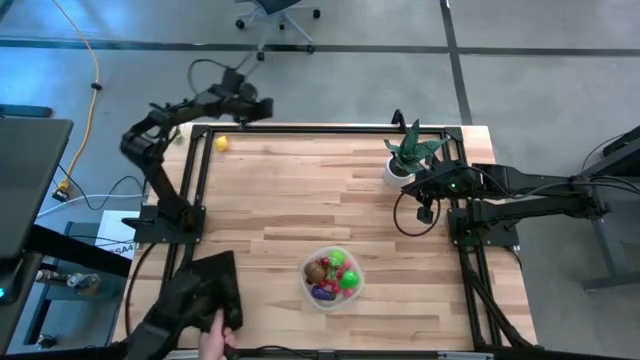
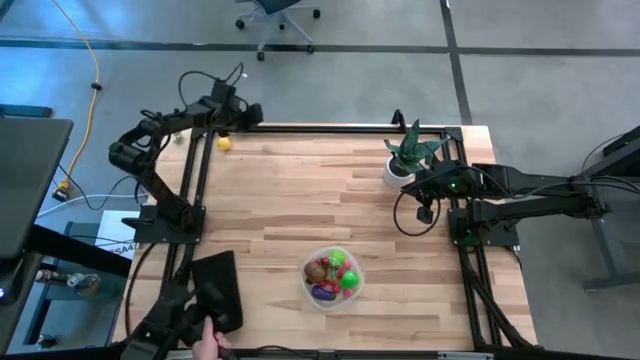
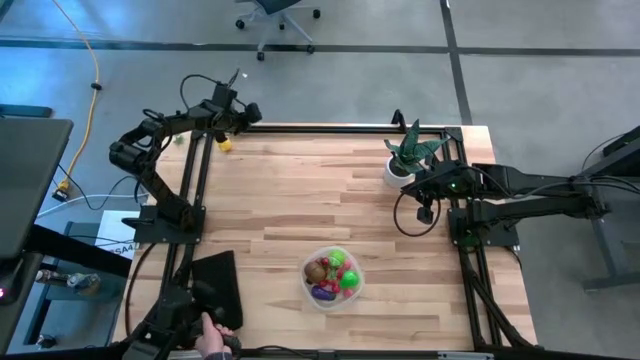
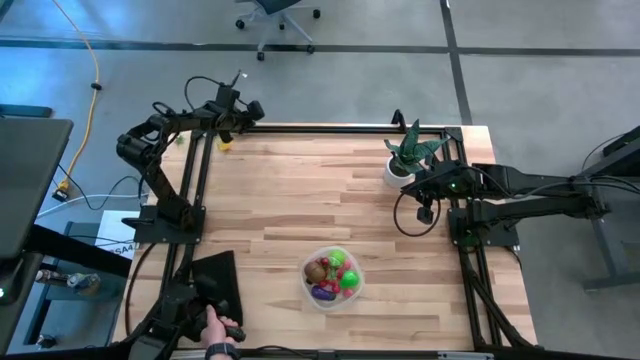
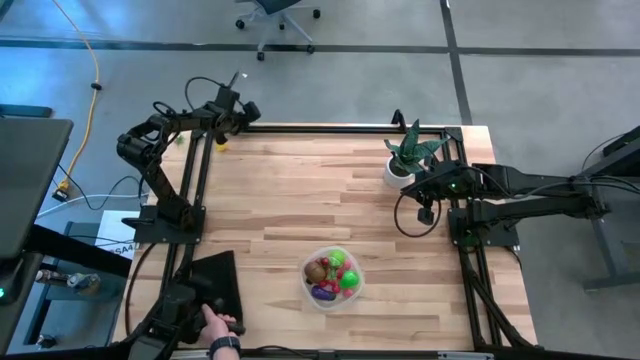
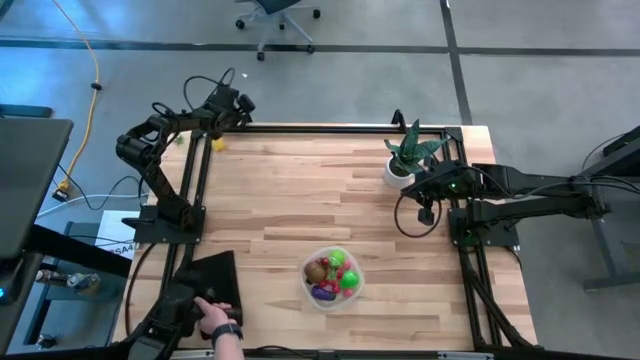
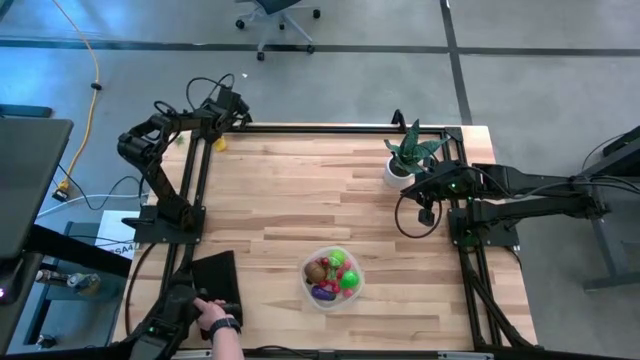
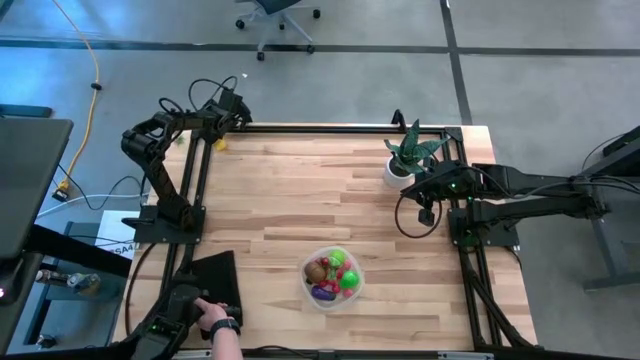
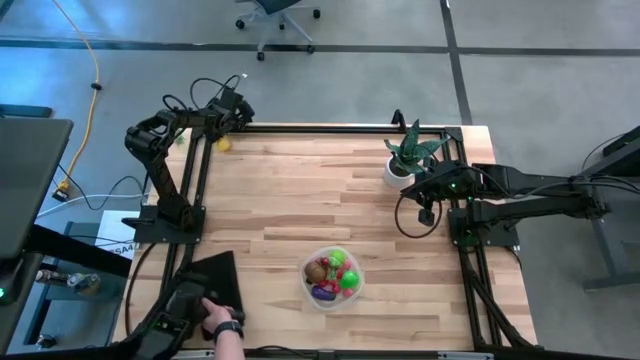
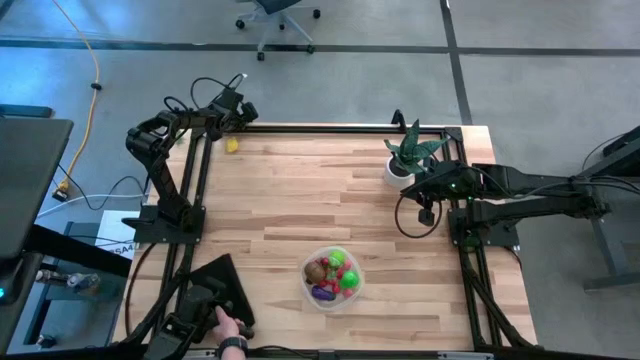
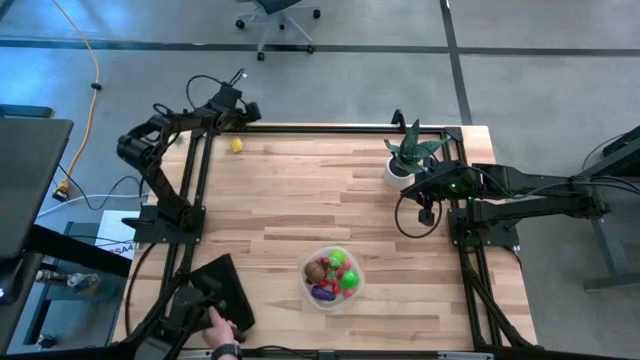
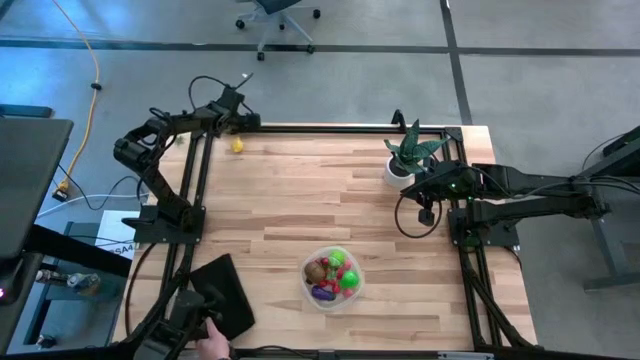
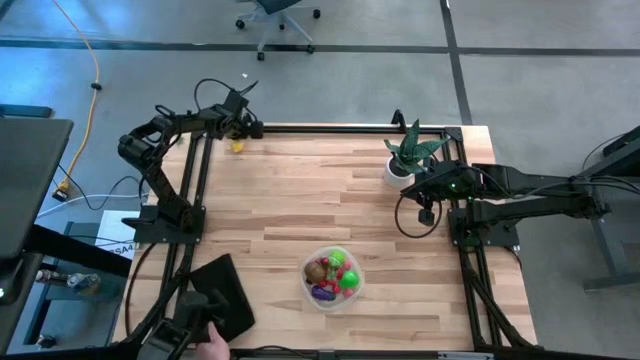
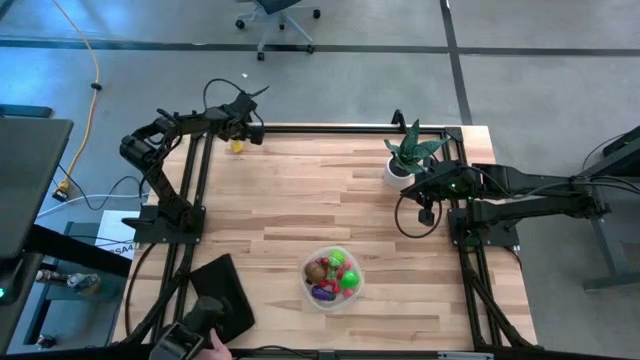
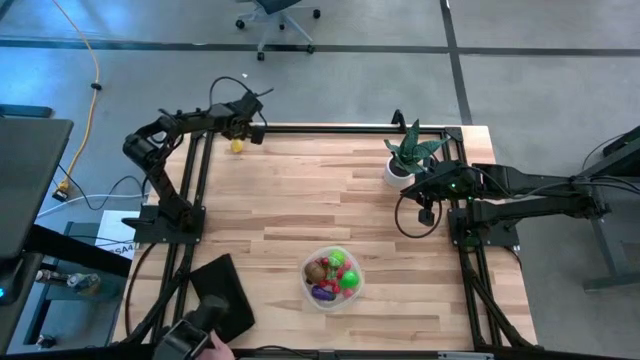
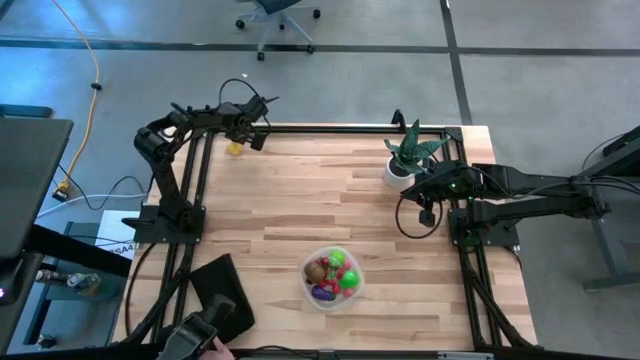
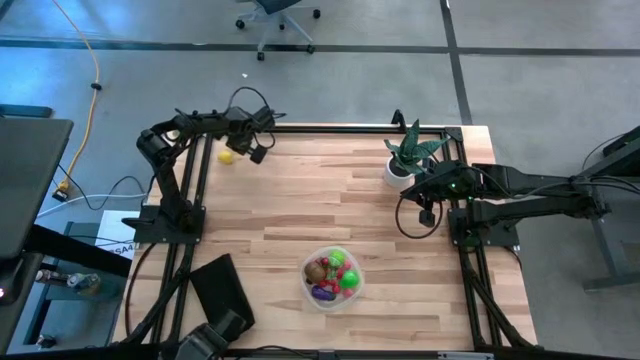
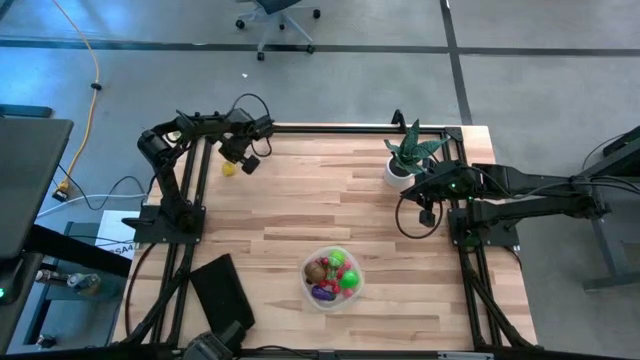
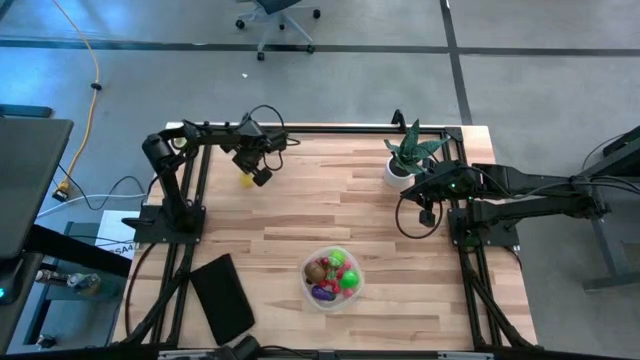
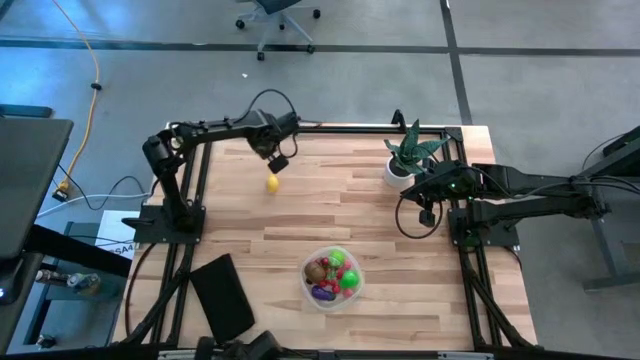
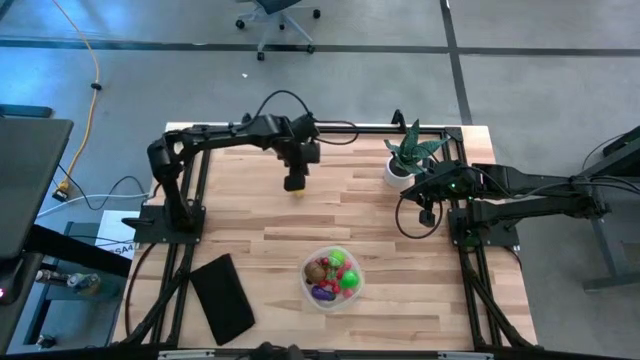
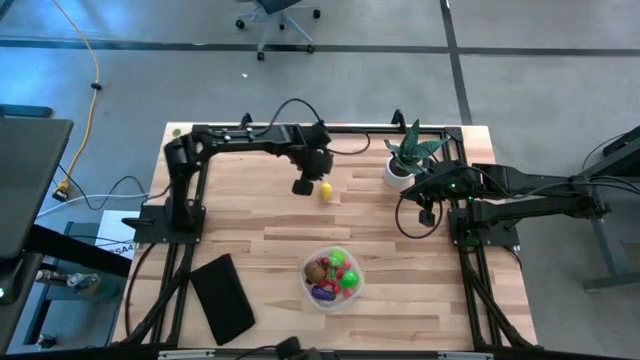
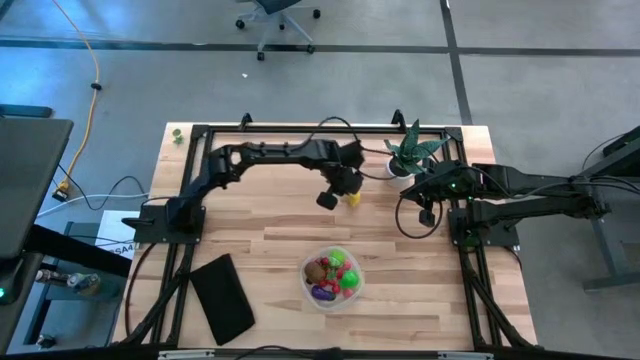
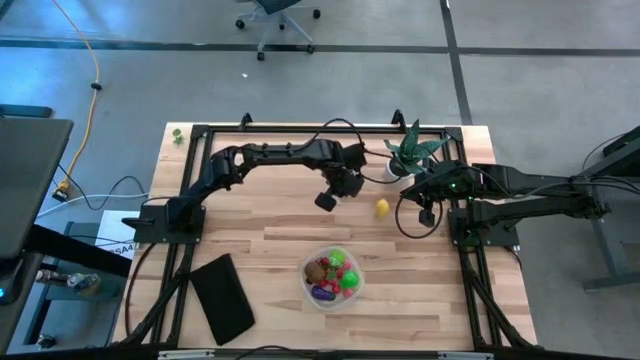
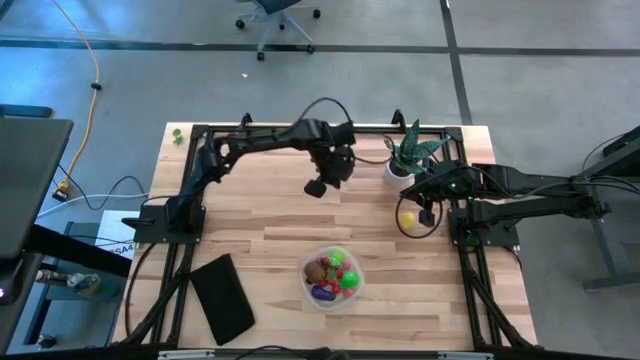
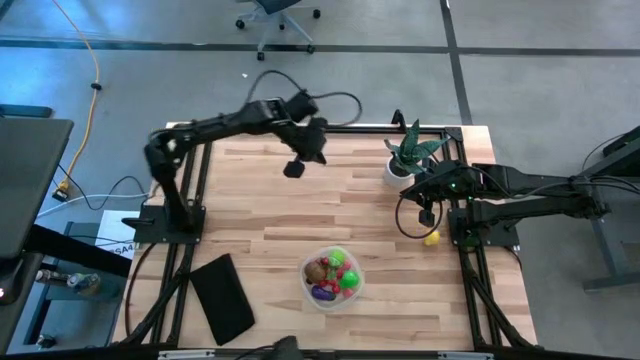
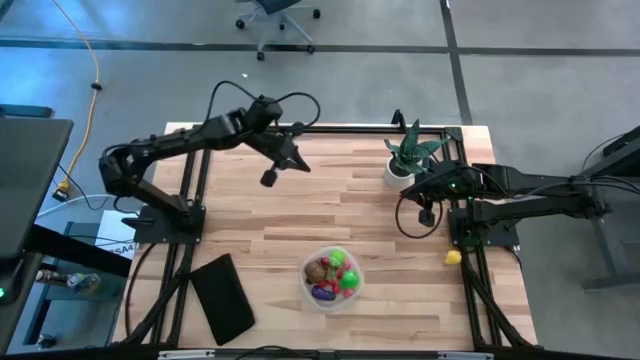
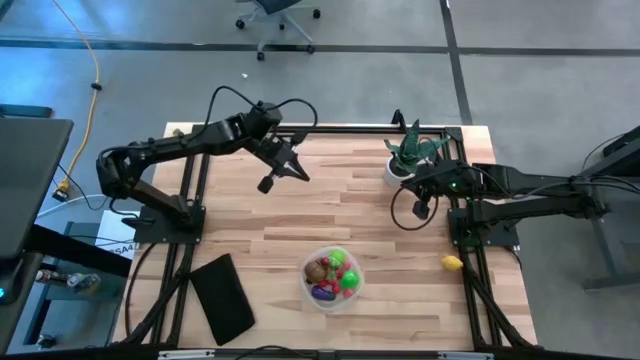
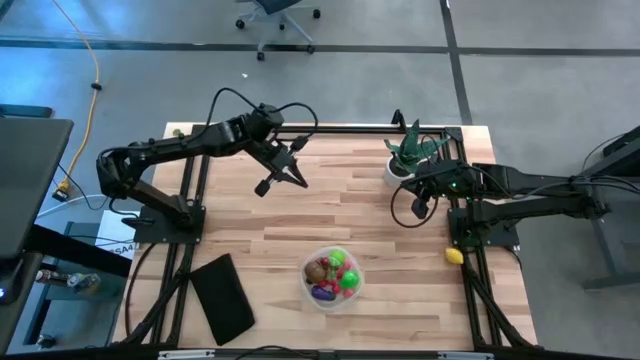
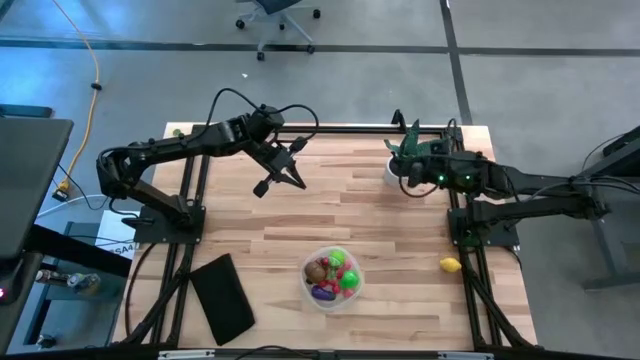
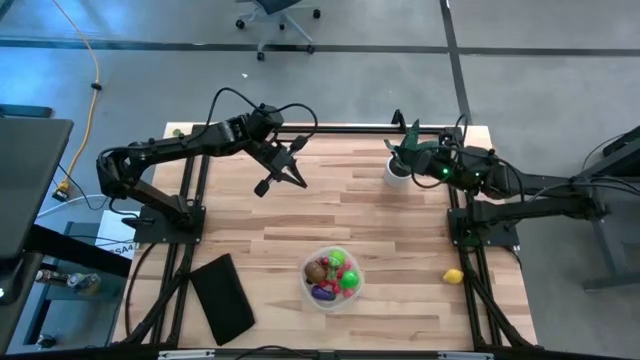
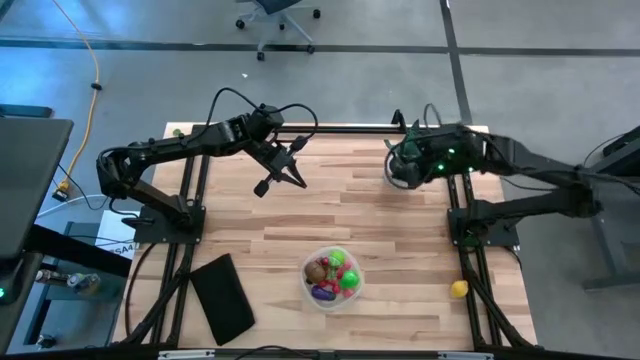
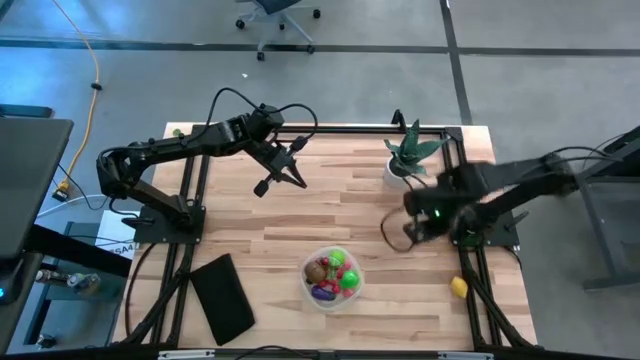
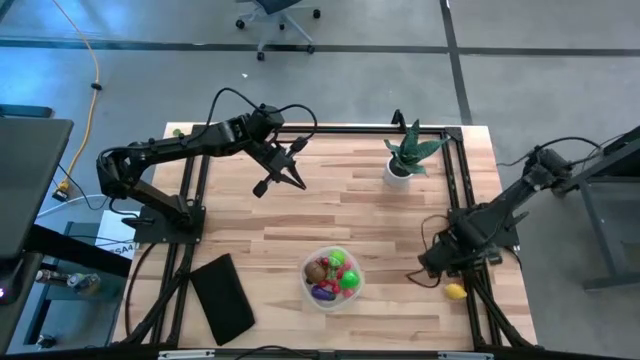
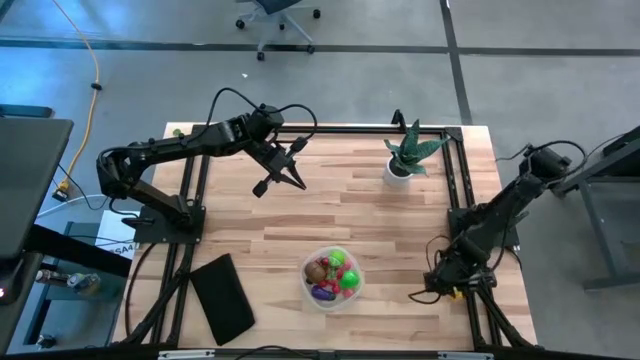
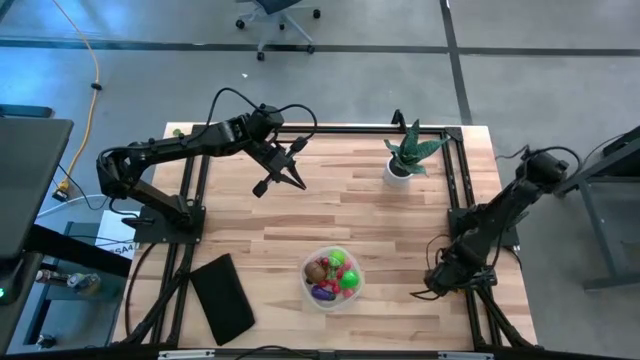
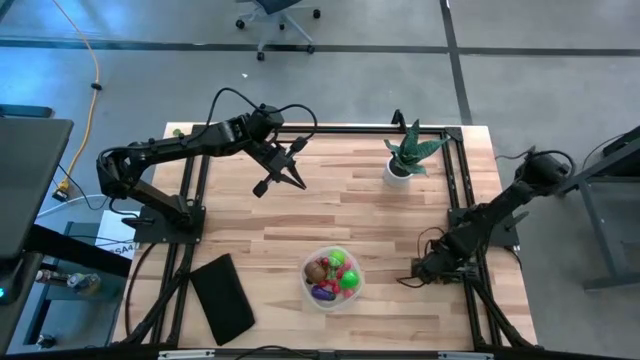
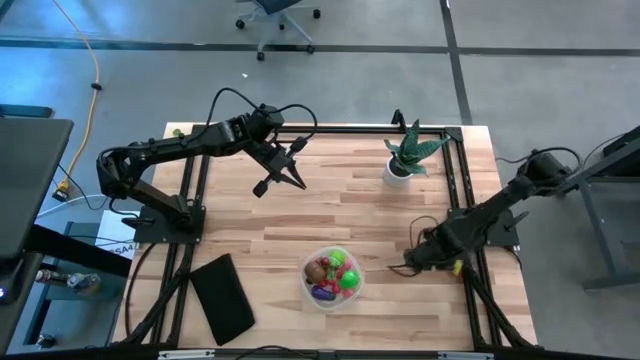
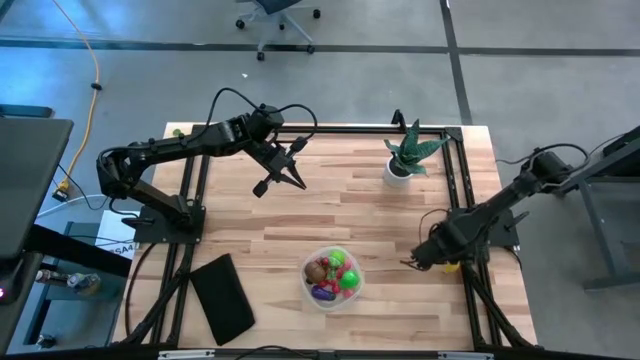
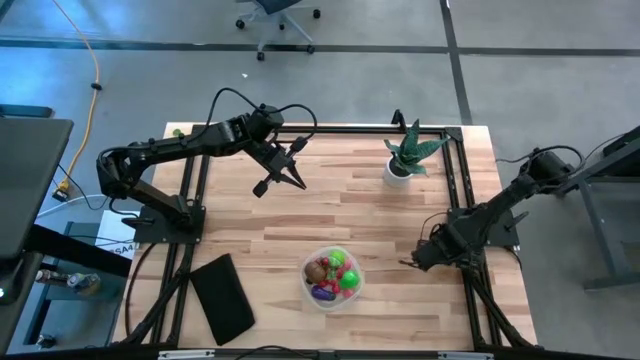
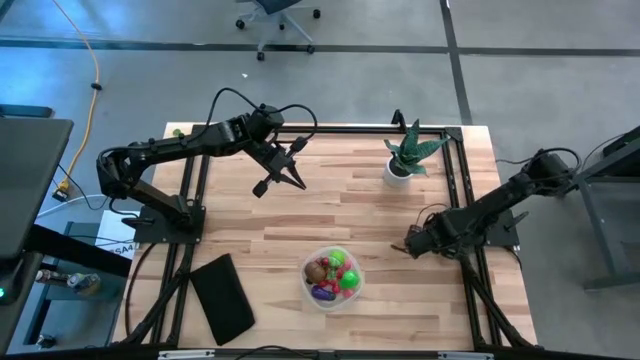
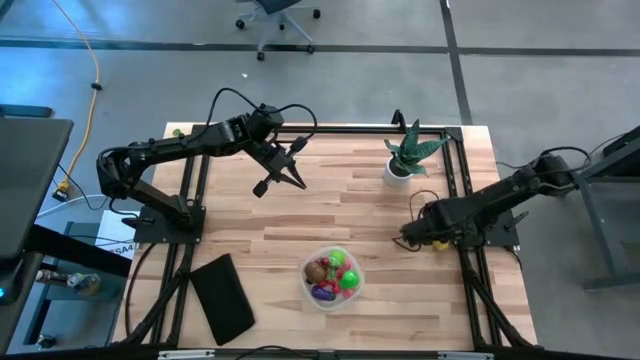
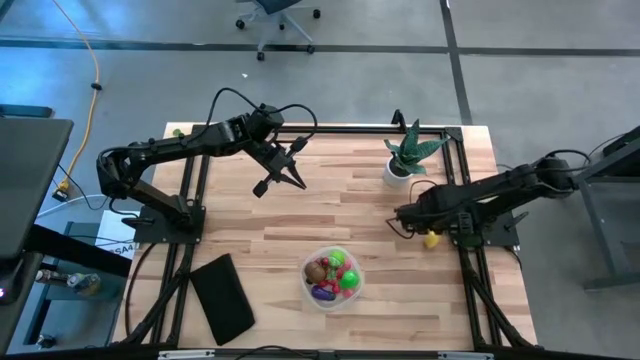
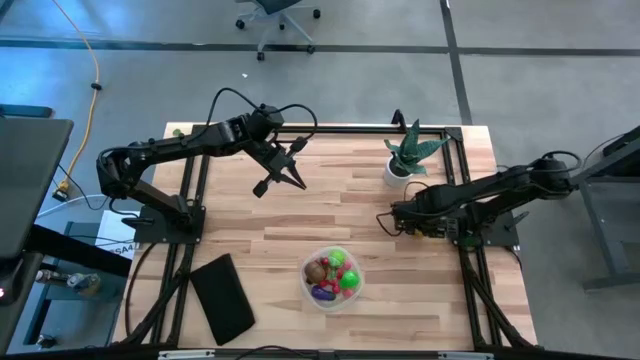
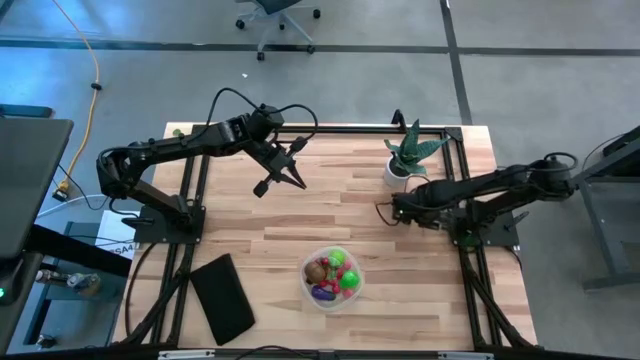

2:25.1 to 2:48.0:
Task: Pick and placing Produce into tupperware
Put the yellow lemon into the transparent container
